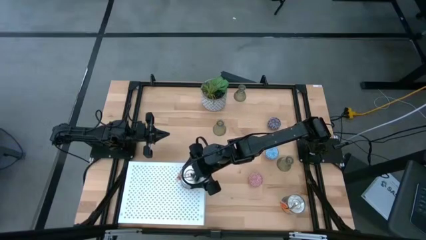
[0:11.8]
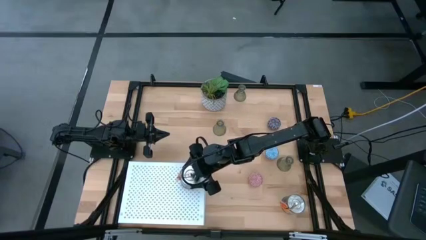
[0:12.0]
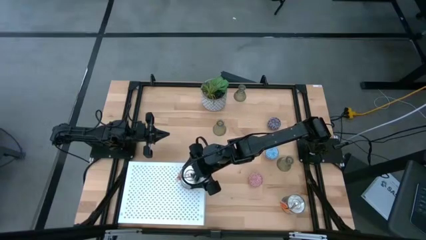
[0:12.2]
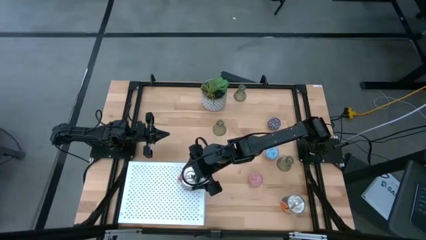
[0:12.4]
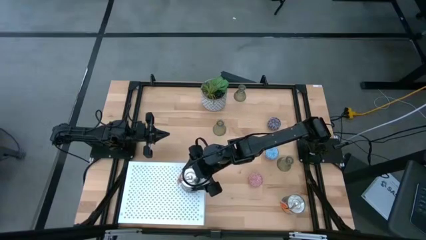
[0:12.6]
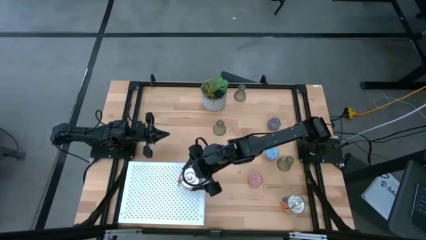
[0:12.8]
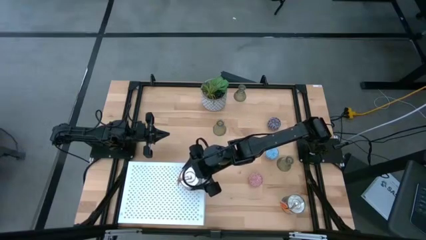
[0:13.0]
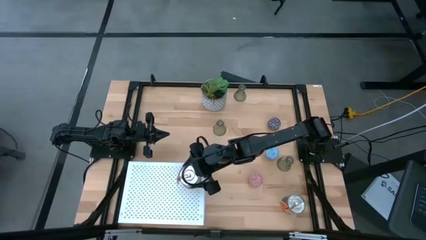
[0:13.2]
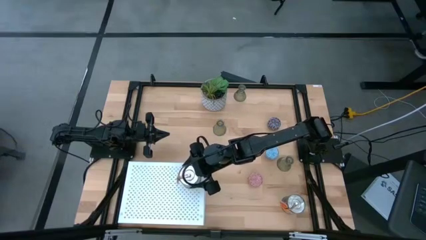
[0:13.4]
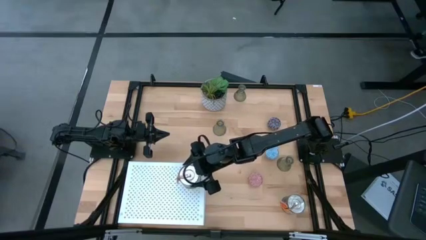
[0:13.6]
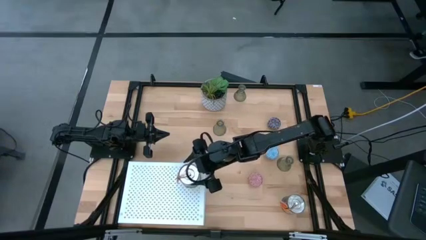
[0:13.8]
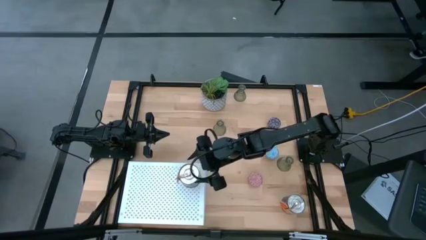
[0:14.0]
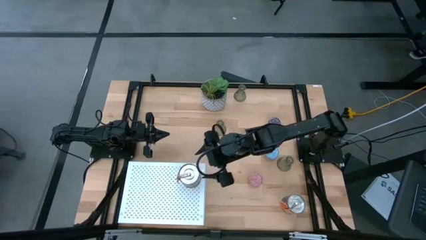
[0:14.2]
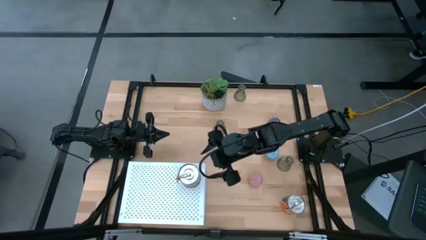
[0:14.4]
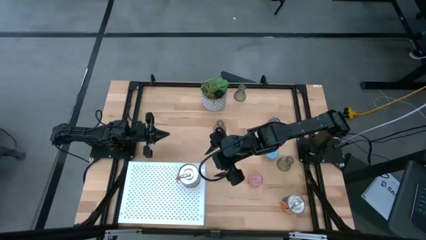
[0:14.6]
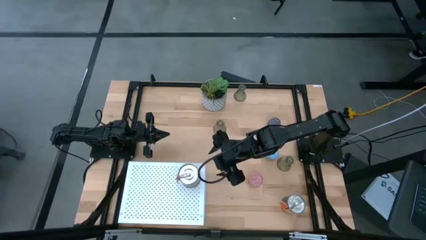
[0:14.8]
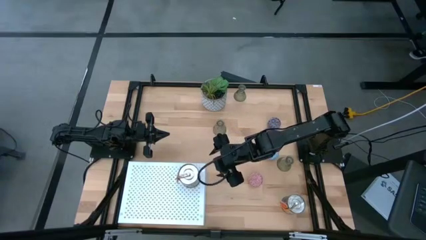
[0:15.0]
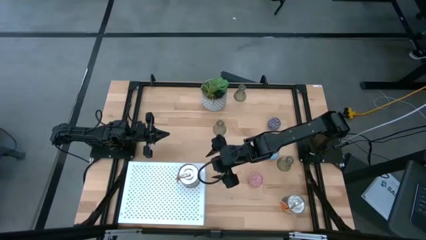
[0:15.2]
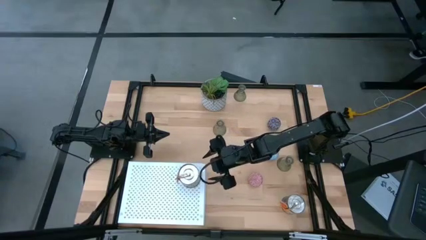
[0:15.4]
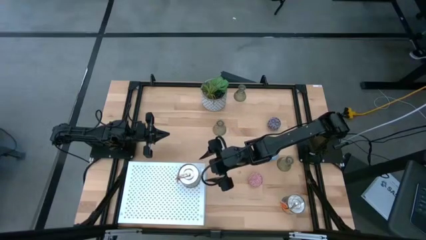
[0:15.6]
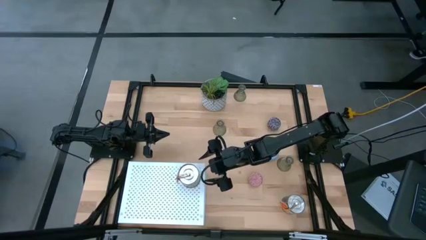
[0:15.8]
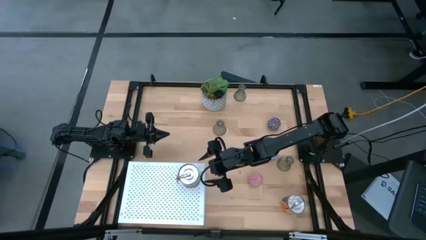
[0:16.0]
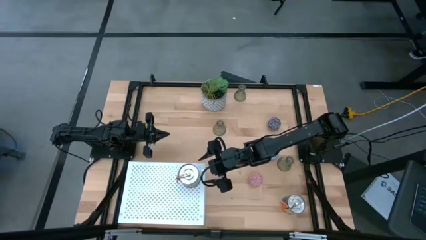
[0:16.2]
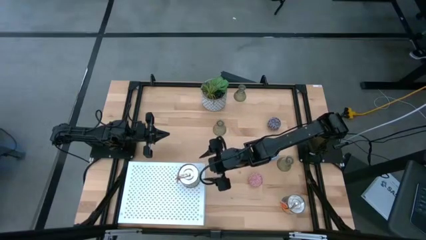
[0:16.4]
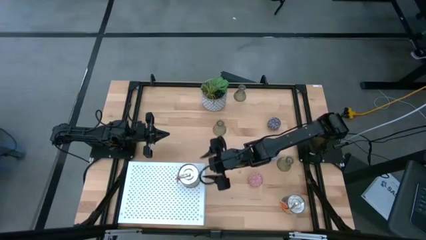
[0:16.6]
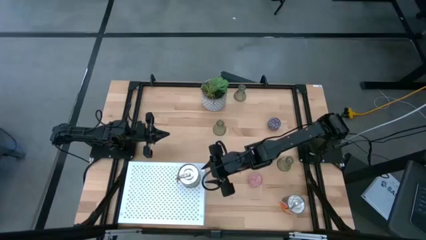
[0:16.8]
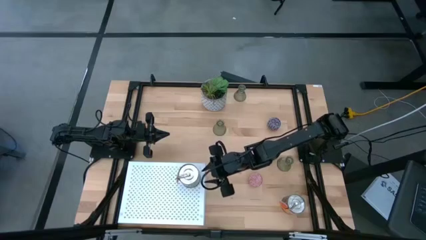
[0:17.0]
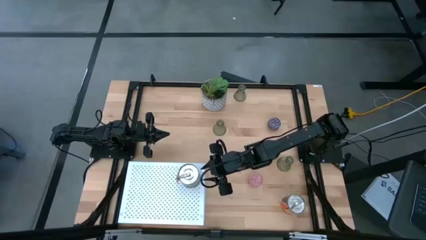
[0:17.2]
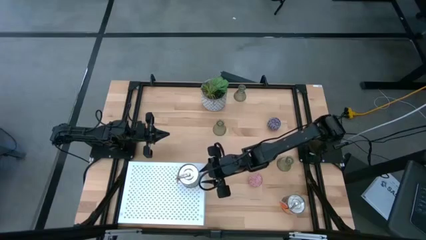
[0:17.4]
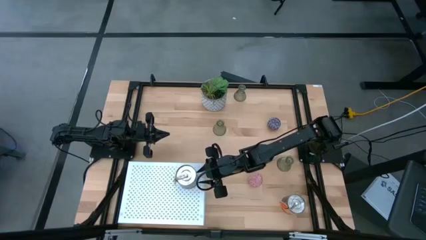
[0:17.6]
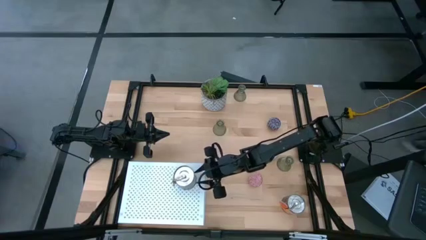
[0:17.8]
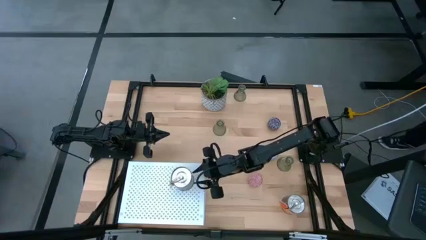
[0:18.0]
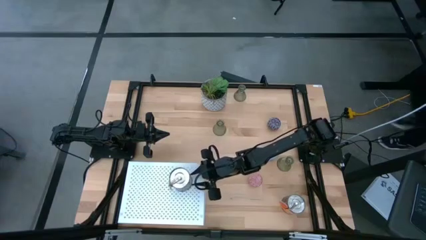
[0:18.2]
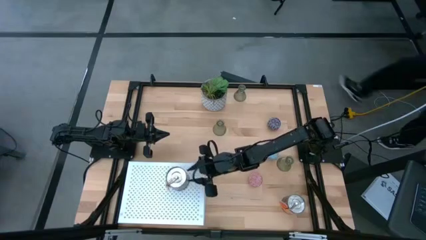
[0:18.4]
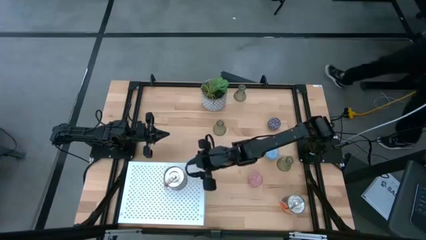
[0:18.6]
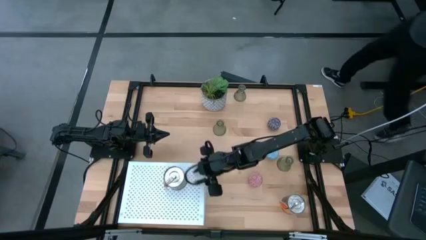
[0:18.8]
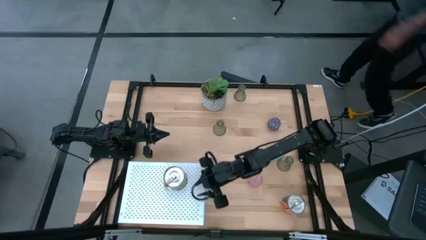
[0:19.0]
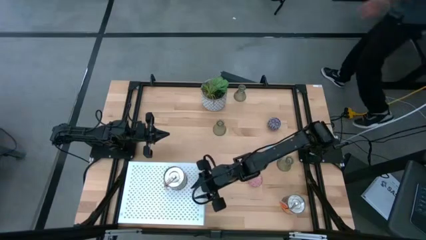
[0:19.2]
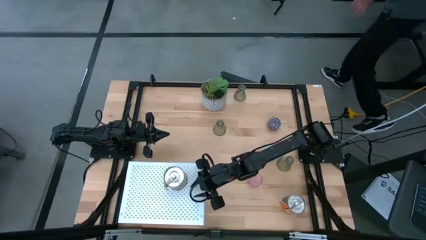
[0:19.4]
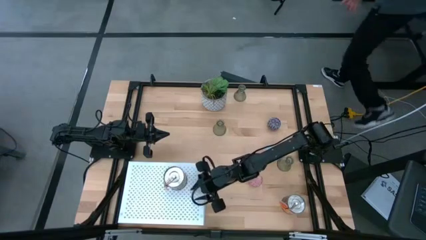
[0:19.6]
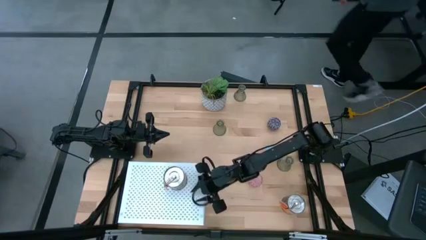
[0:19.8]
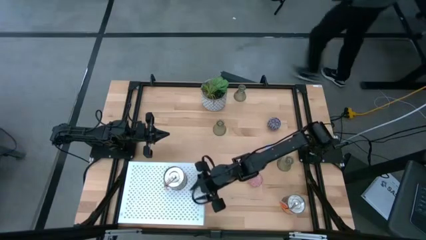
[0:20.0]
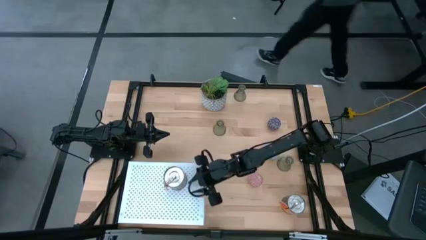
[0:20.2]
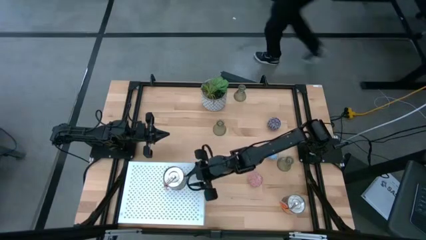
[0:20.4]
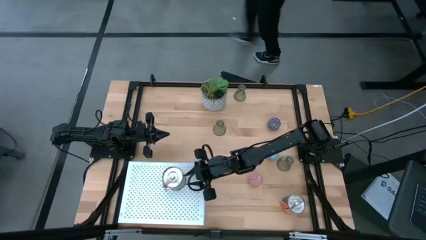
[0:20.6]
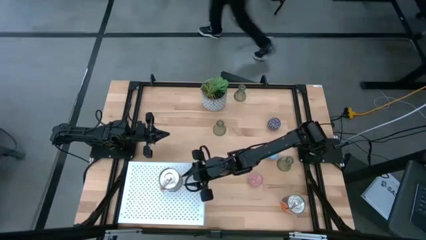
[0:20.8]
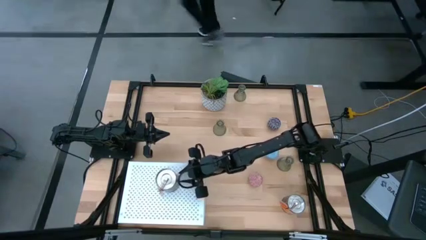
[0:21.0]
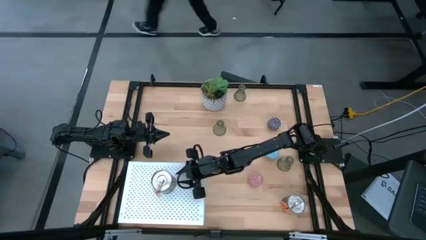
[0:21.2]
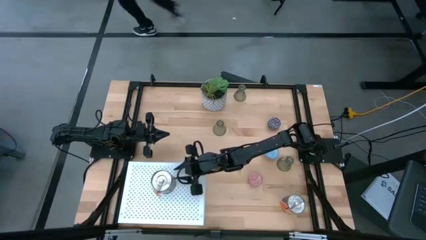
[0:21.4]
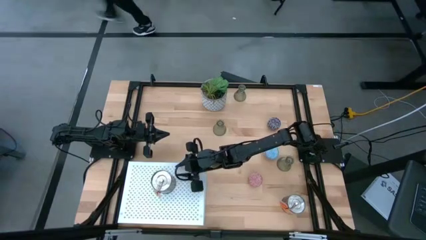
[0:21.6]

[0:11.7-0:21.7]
Task: Pick & Place candle stick holders
Put the top silver scented candle on the shelf

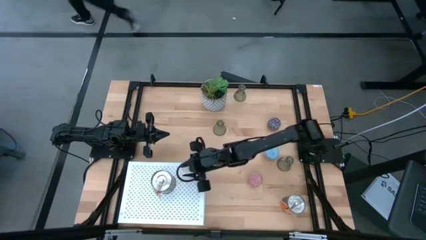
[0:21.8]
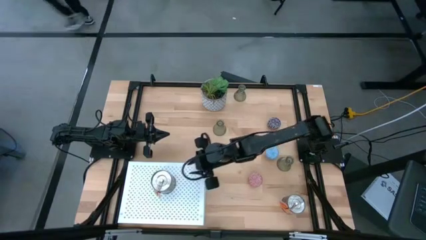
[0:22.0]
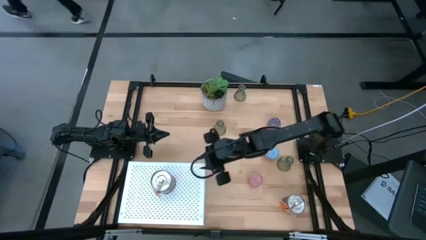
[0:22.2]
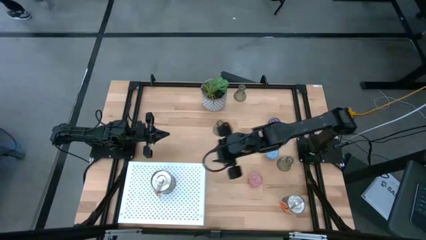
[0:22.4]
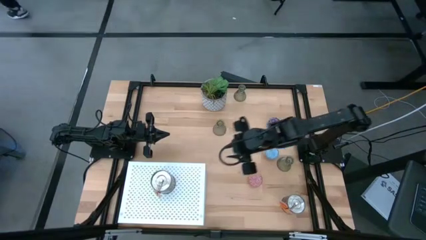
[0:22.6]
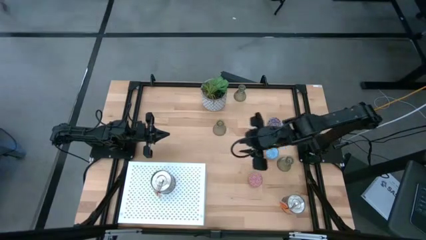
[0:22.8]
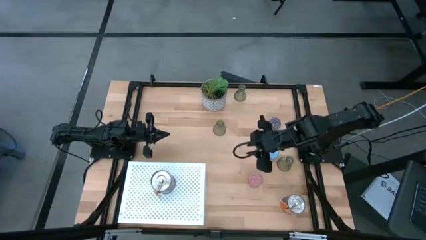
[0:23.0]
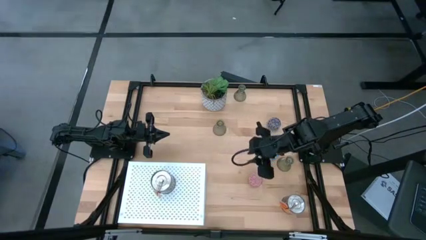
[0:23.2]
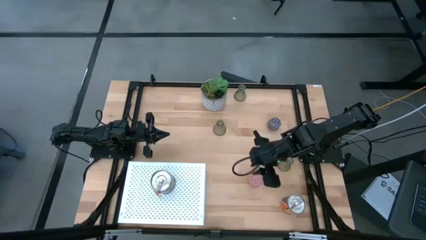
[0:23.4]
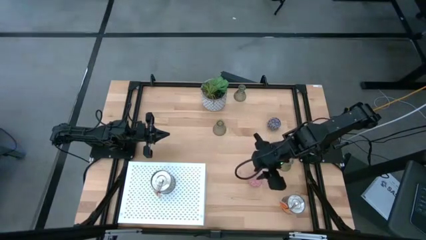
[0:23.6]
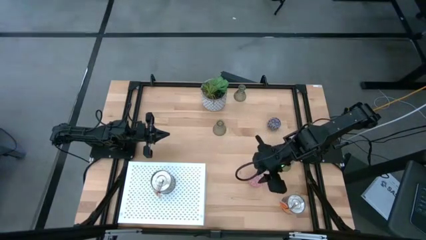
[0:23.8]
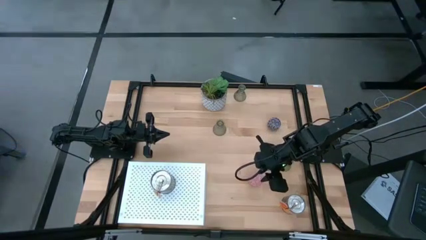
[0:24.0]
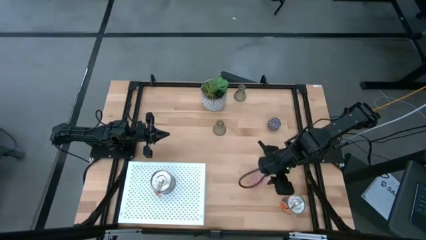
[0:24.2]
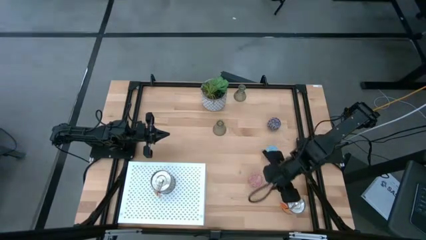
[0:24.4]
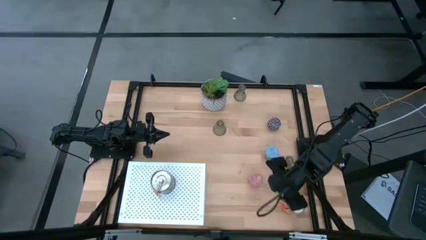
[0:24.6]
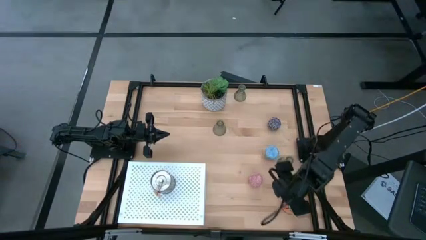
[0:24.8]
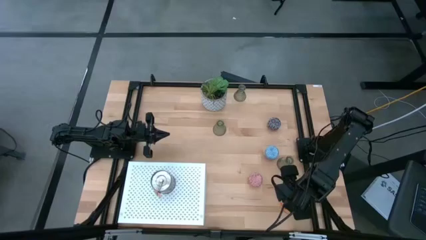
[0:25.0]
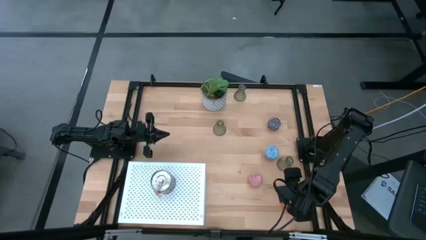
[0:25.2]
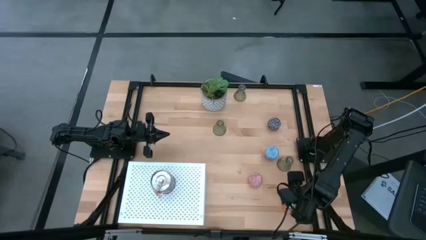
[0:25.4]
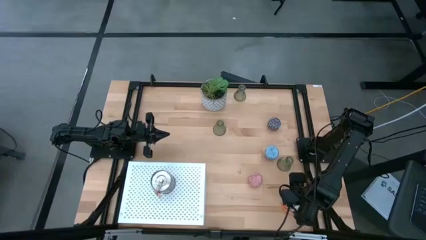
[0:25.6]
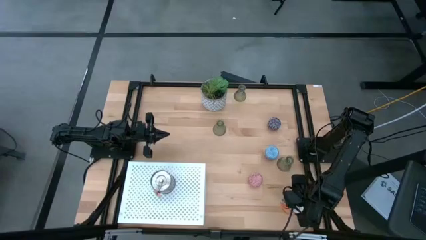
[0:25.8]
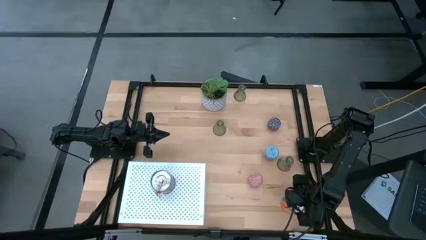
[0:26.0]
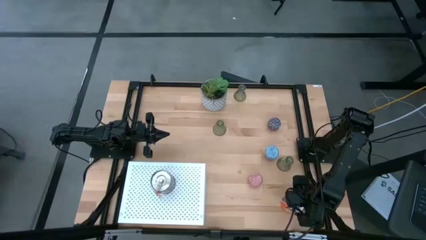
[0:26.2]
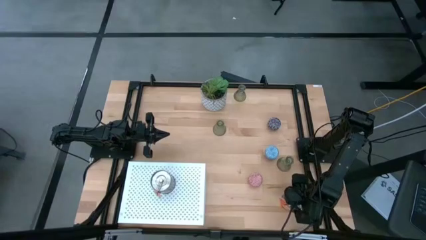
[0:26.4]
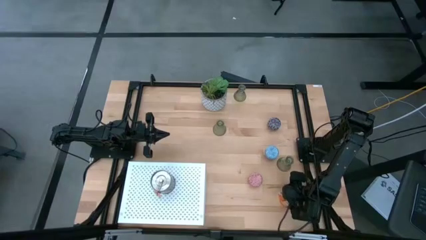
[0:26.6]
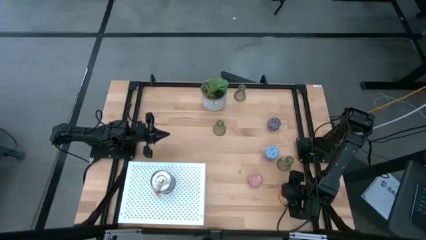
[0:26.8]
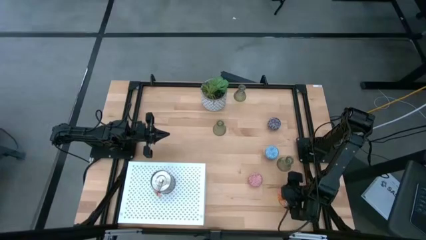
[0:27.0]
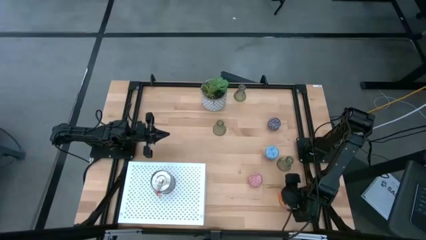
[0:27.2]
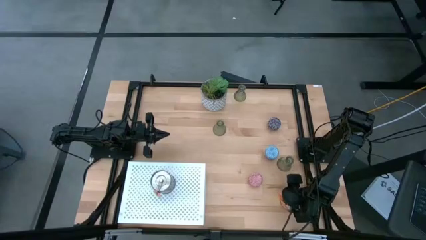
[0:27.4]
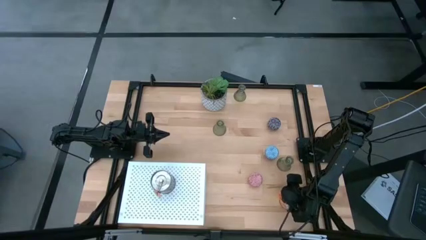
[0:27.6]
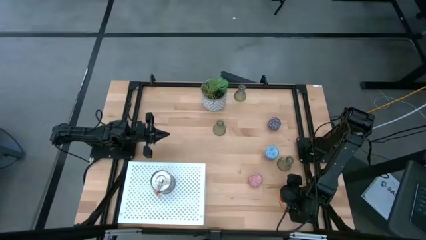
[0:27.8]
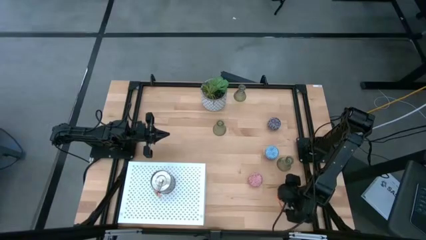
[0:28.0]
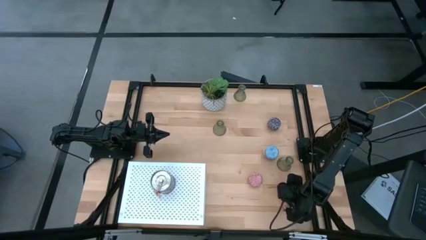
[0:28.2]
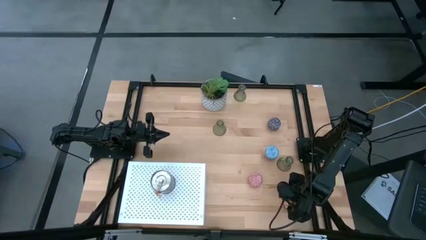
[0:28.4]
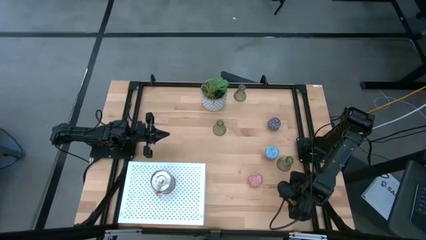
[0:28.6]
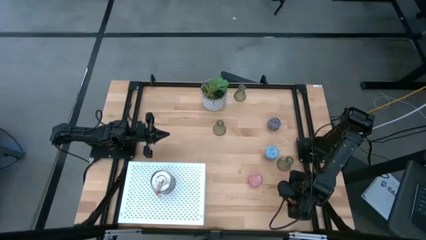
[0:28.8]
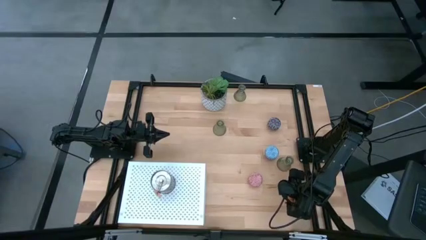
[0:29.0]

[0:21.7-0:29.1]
Put the silver scented candle on the shelf
